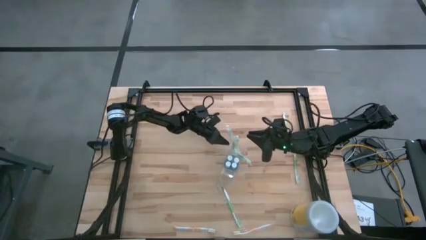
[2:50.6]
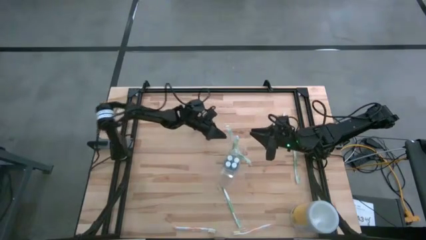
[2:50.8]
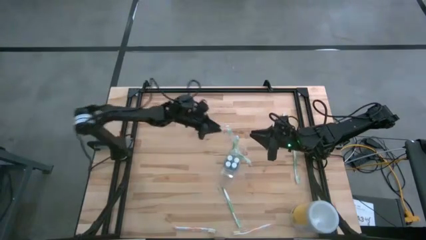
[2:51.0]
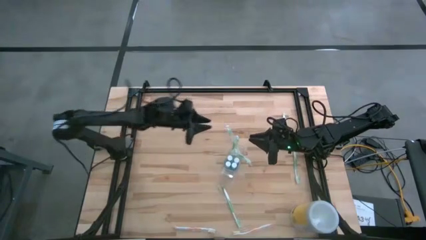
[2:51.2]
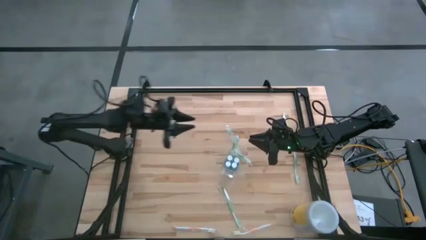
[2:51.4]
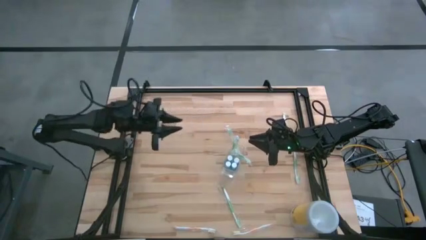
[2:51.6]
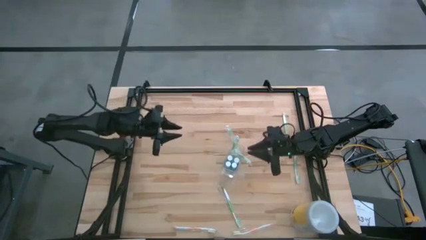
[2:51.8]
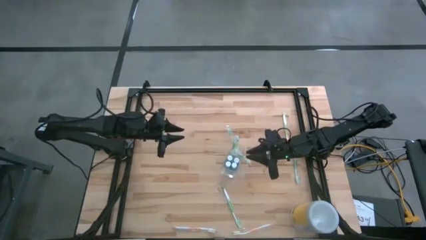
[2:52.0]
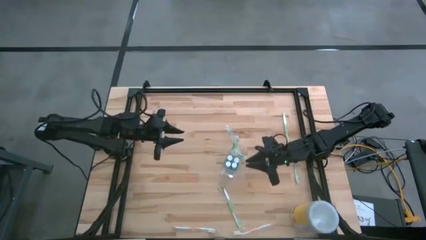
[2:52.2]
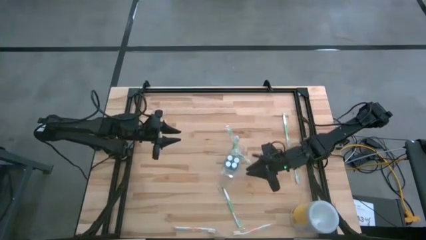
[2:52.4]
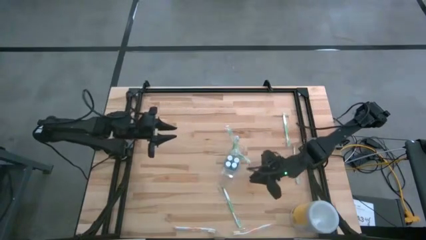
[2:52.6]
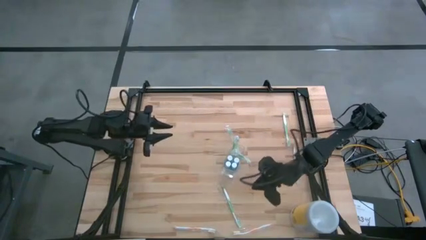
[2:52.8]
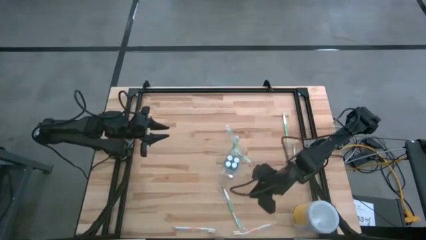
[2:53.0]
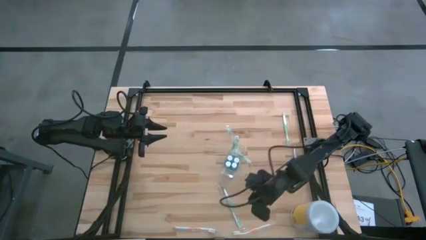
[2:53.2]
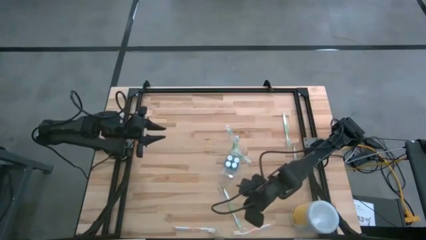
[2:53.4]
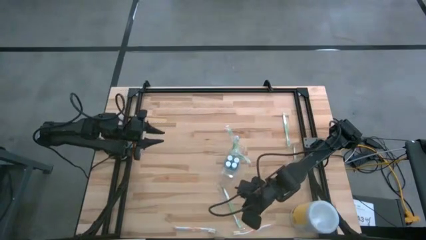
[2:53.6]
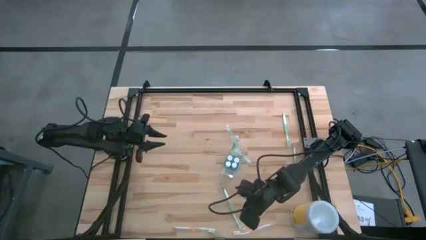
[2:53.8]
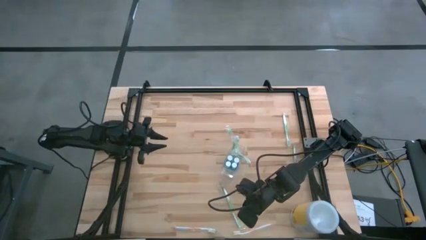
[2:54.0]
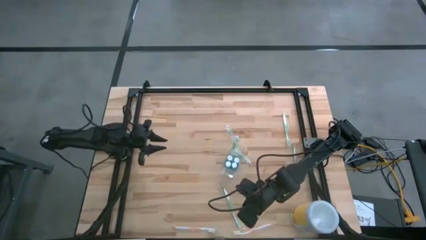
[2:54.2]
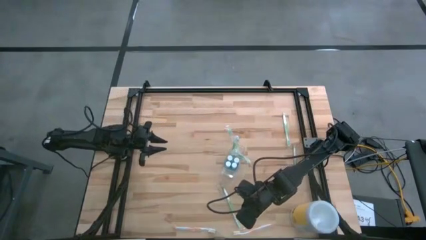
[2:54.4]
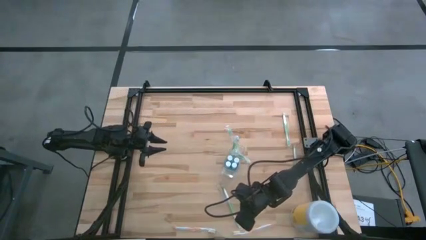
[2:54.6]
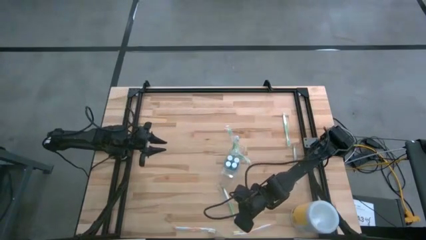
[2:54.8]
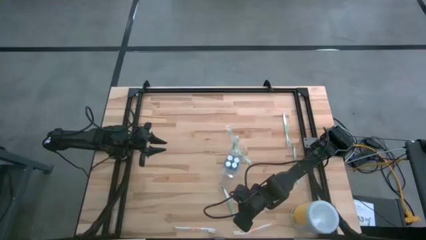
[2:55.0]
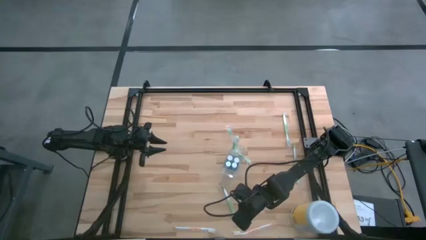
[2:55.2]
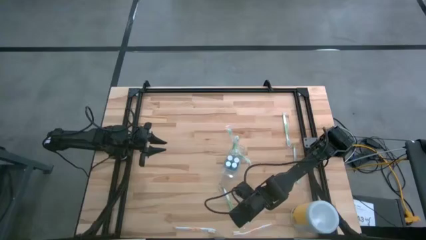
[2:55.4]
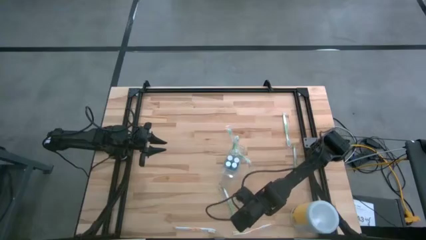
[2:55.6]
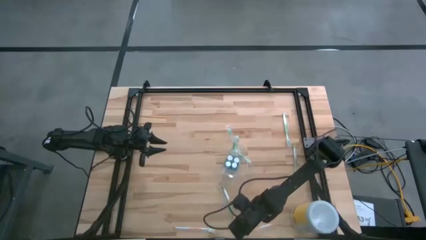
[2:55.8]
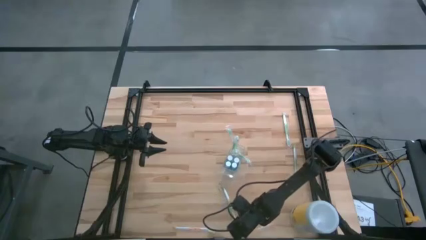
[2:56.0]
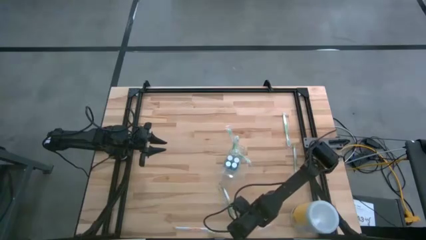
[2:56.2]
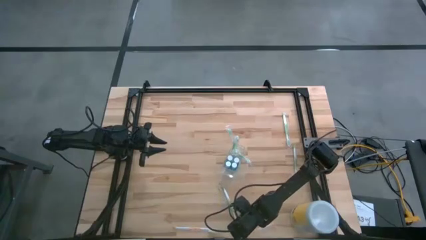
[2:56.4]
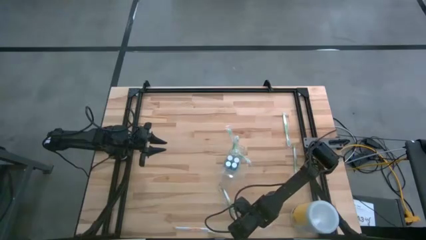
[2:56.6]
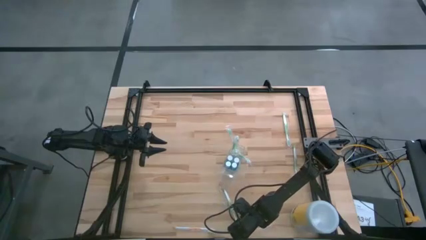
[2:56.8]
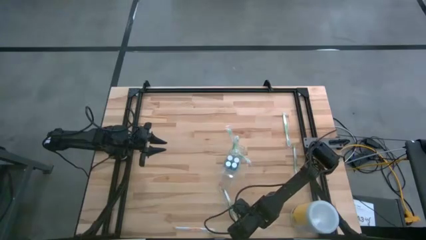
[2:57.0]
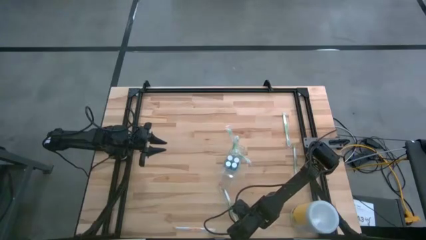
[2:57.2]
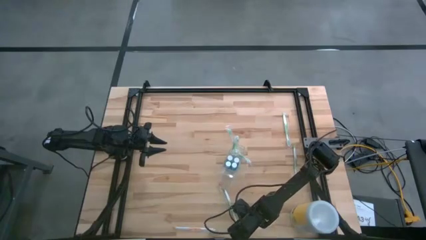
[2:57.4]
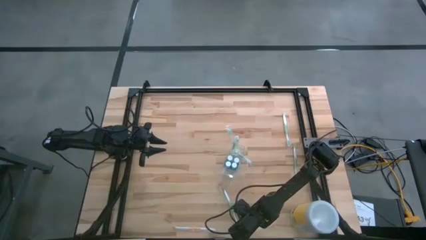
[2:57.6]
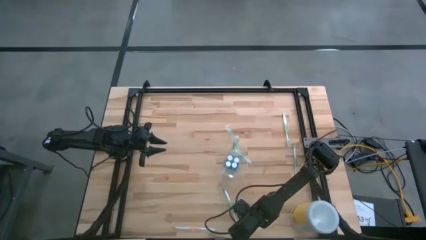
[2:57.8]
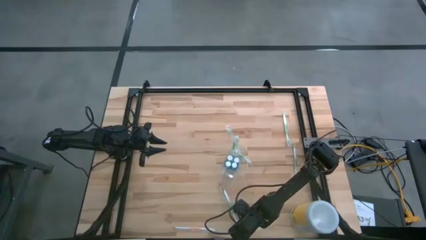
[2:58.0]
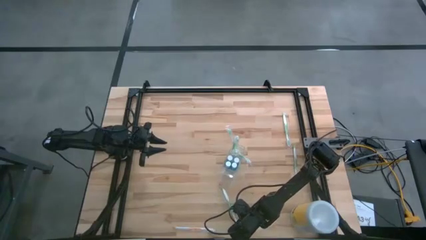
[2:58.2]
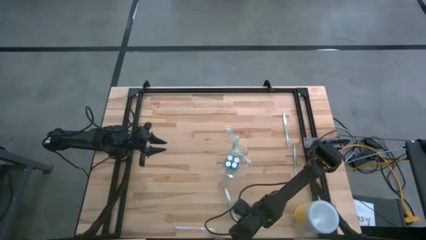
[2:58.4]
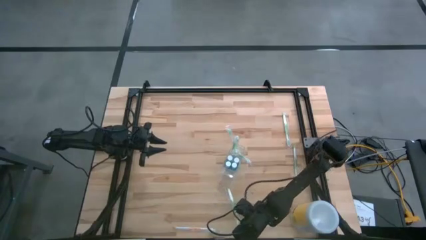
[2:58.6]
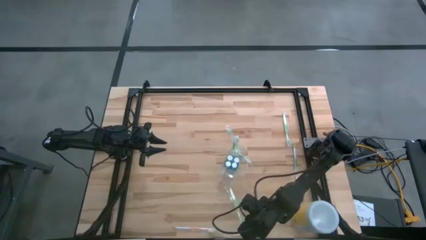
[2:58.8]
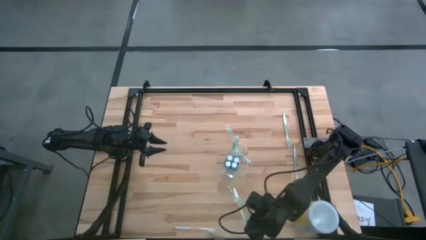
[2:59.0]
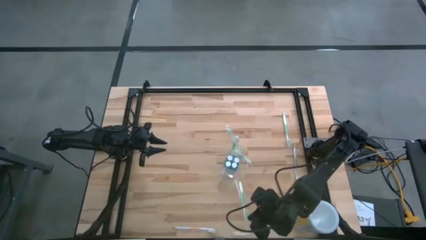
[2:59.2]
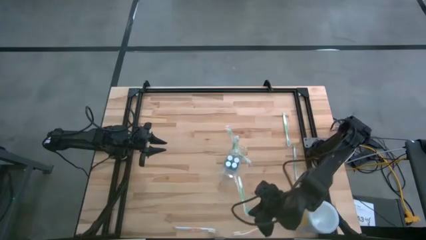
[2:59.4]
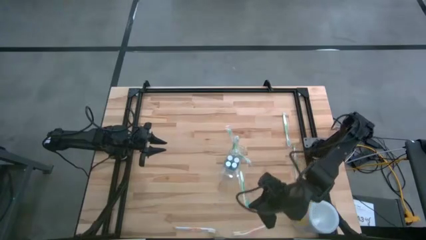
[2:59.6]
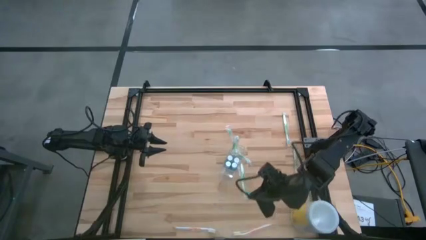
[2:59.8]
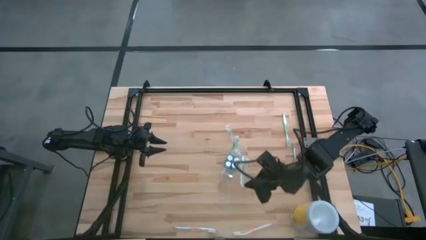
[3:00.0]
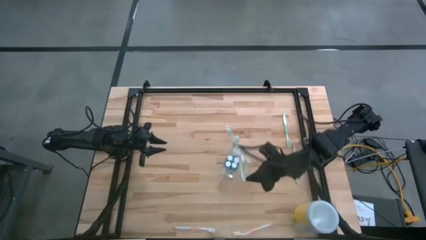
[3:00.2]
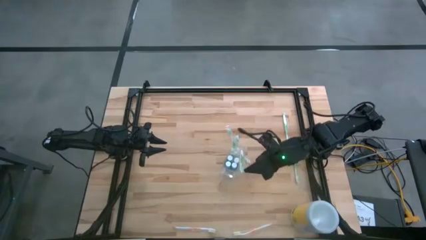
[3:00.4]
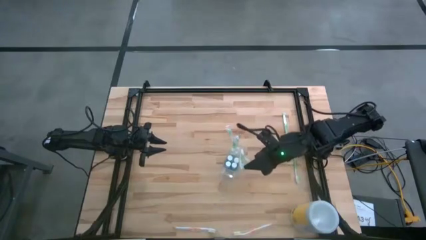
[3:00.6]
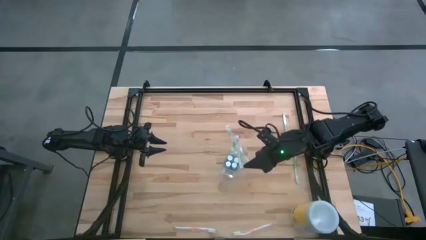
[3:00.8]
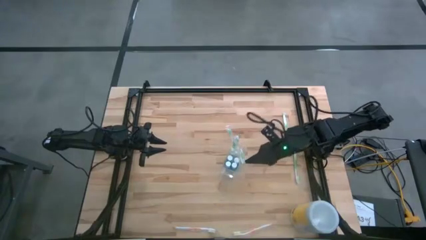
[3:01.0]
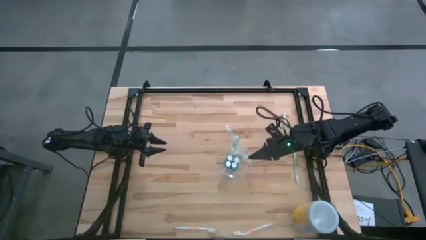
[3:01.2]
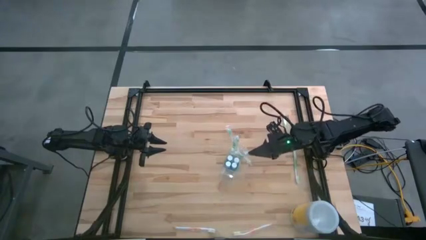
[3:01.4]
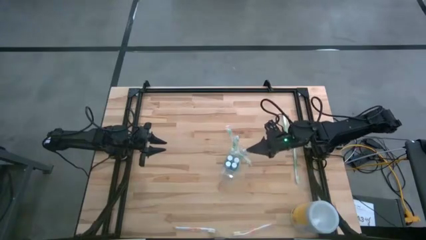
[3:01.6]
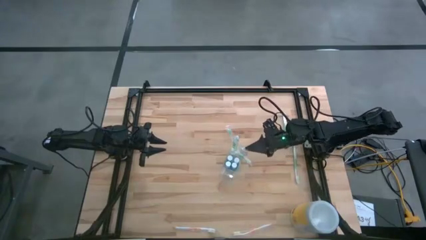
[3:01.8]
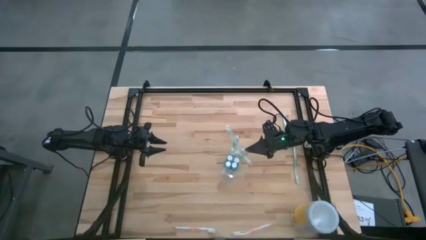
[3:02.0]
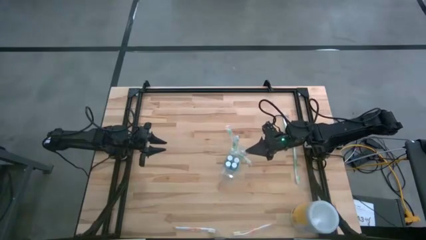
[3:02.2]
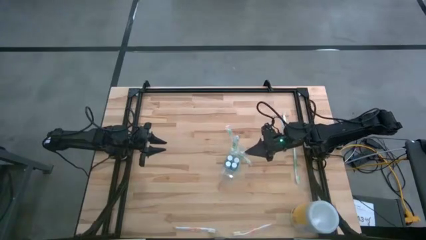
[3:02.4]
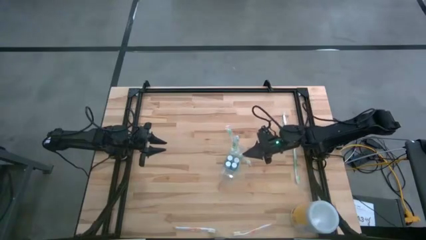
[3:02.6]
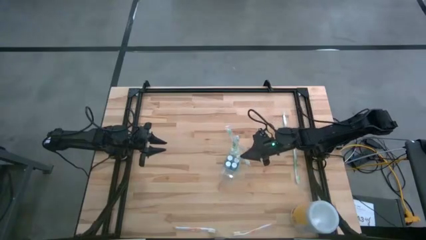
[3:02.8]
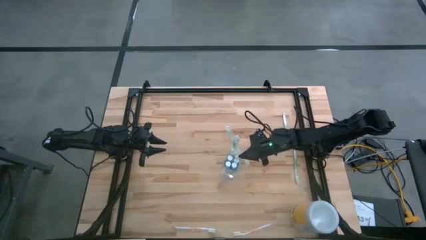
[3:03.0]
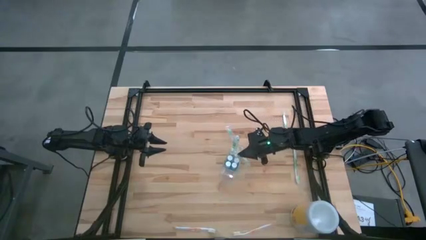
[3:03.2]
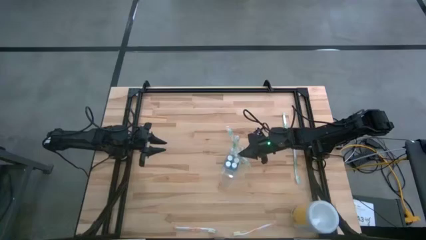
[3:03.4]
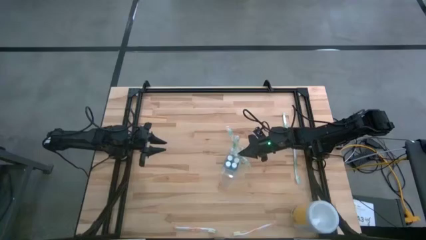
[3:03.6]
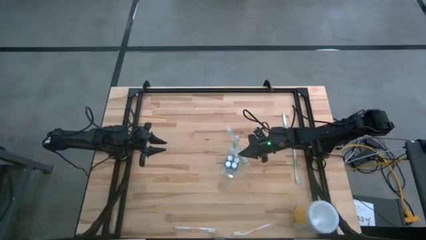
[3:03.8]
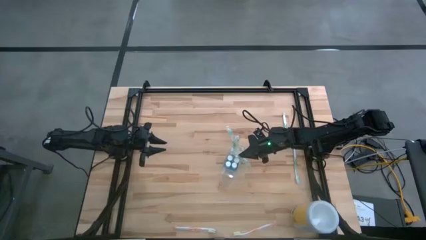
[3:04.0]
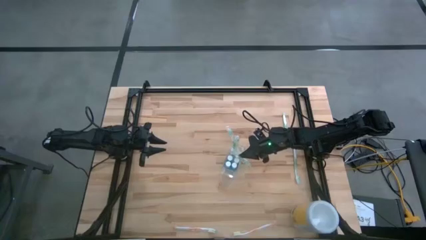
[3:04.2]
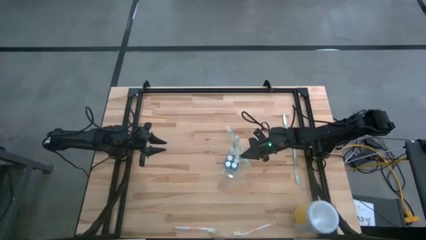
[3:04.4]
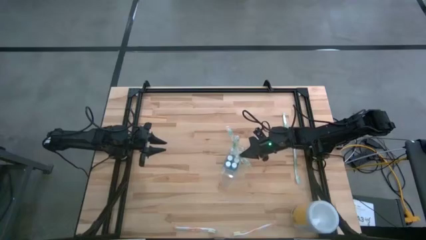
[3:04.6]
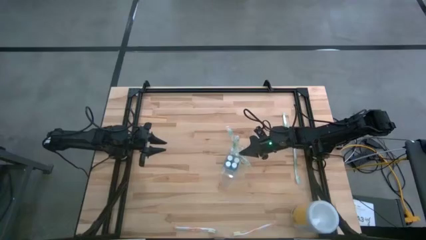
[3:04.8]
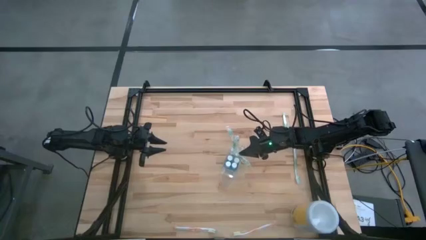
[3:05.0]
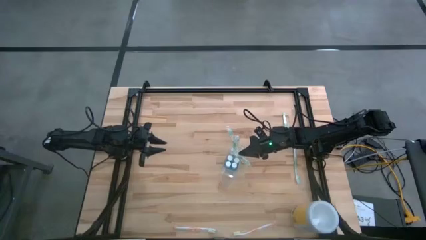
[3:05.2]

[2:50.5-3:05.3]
Task: Pick & Place toothbrushing station
Put the white green toothbrush into the back side of the transparent organizer

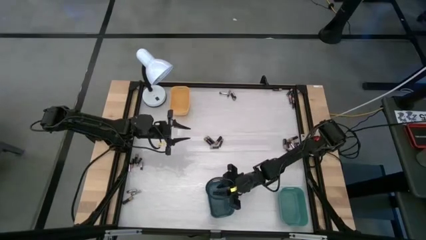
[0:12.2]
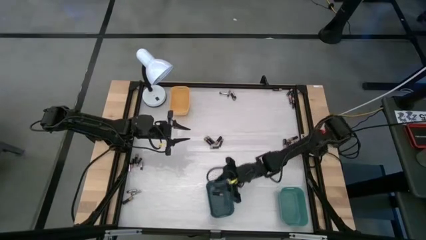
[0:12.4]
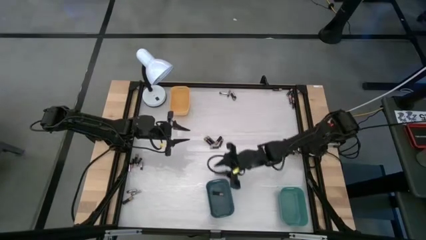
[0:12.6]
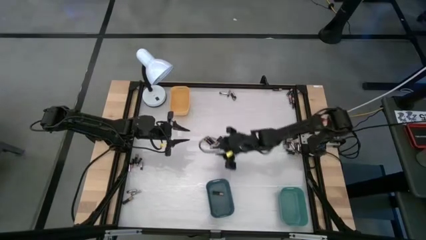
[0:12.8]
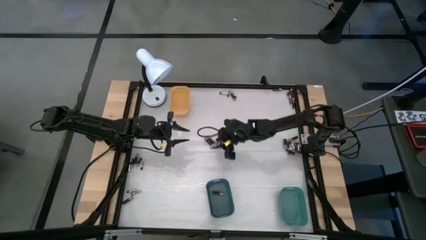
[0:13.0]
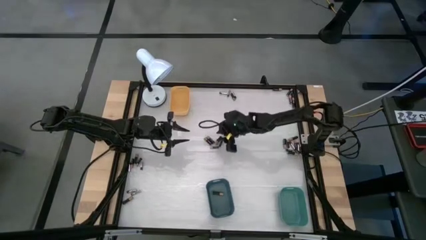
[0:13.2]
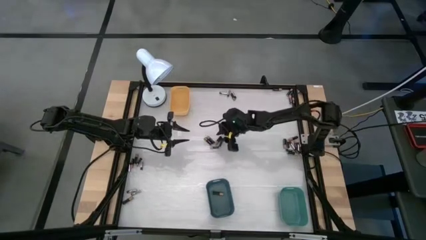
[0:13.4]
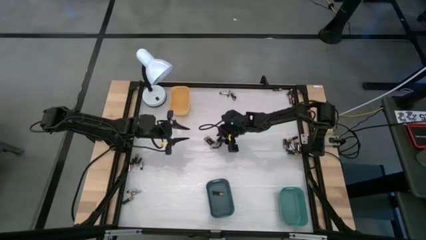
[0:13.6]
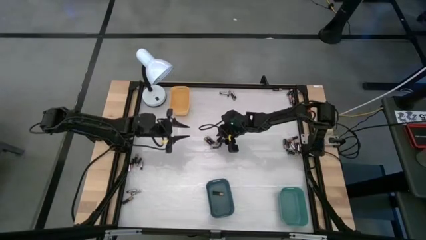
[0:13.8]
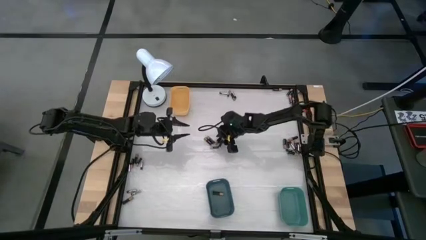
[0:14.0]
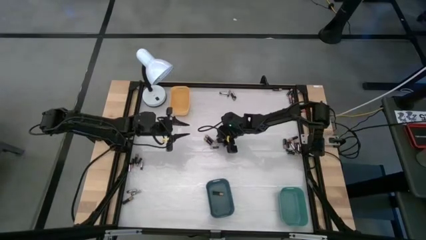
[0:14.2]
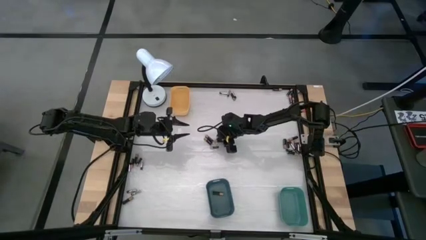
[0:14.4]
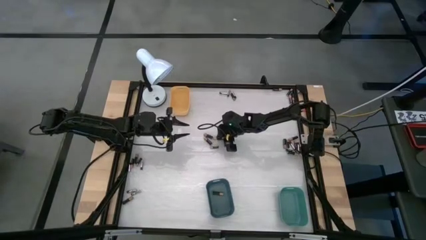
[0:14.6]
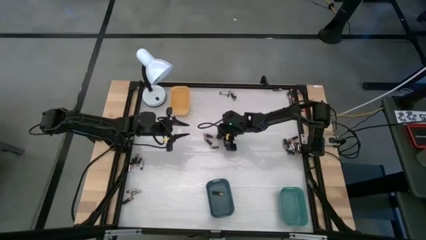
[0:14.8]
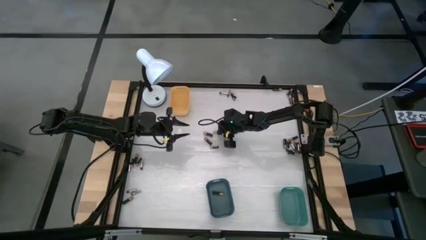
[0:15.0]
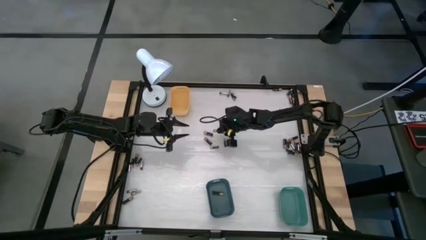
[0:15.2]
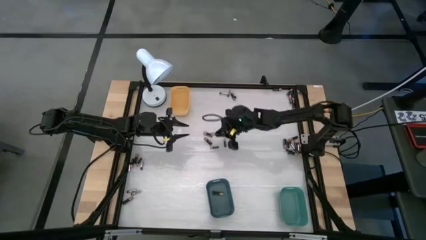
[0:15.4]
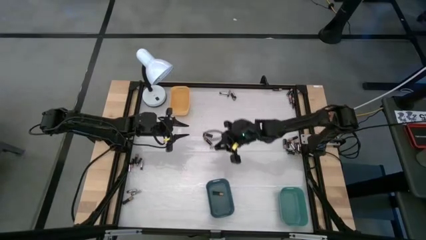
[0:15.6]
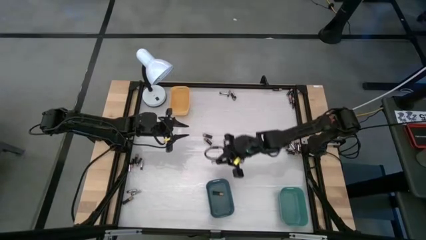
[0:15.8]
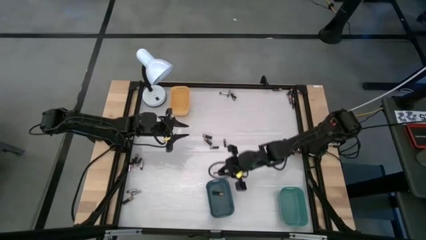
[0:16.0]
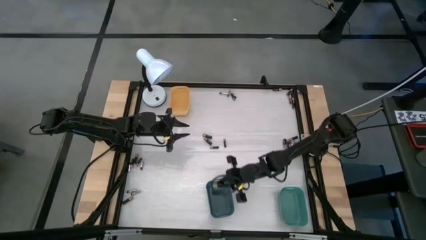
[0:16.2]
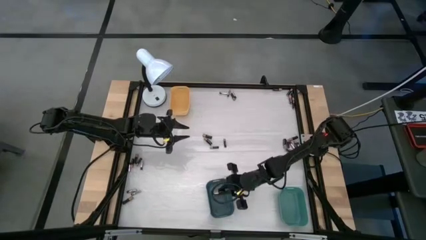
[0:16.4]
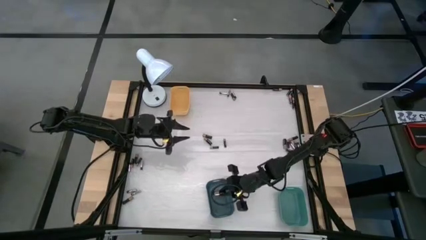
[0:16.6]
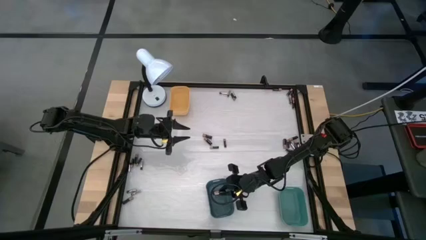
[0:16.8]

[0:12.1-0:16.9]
Task: Sort batteries
Put the black battery into the blue bin
